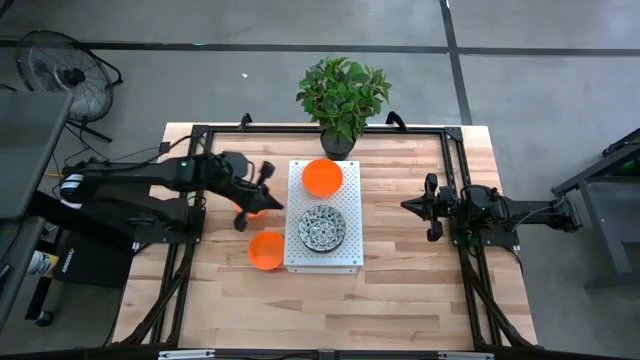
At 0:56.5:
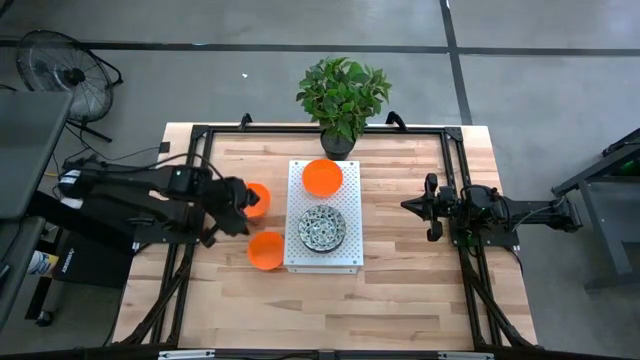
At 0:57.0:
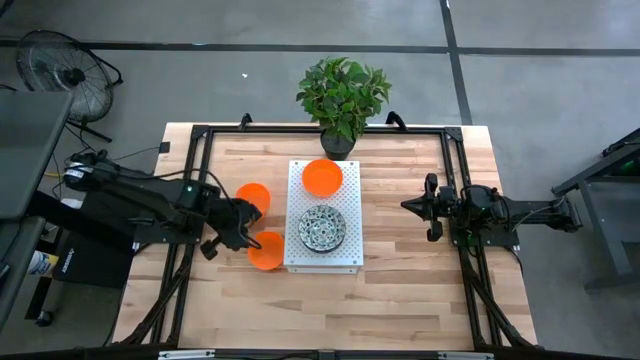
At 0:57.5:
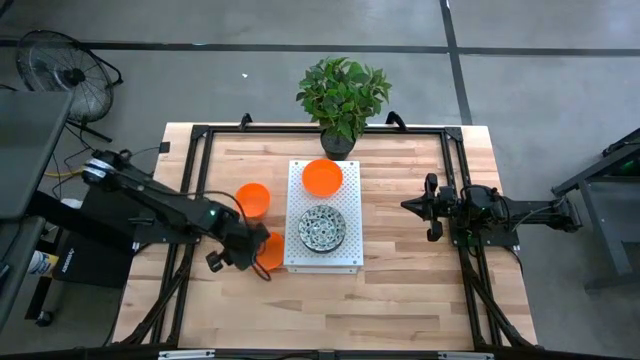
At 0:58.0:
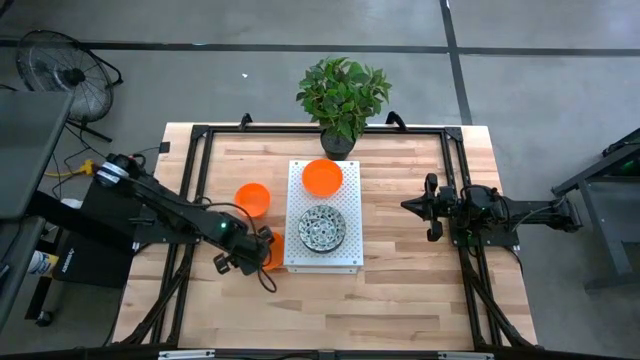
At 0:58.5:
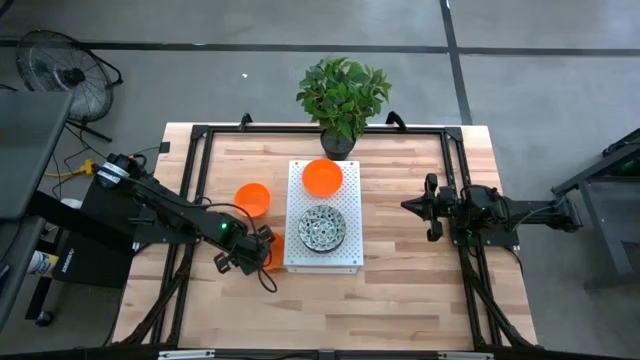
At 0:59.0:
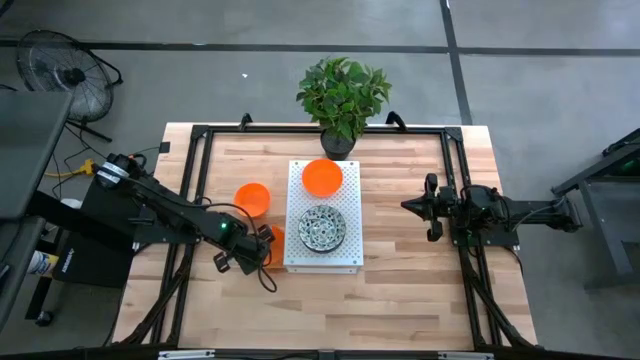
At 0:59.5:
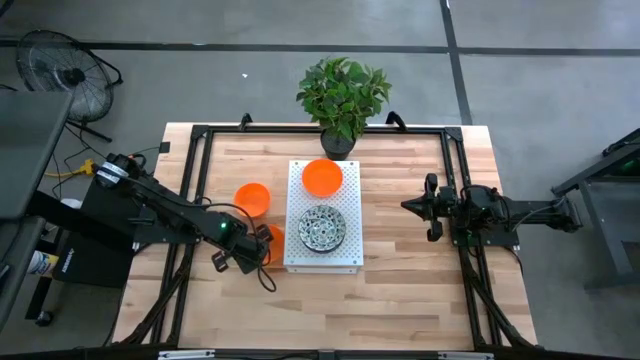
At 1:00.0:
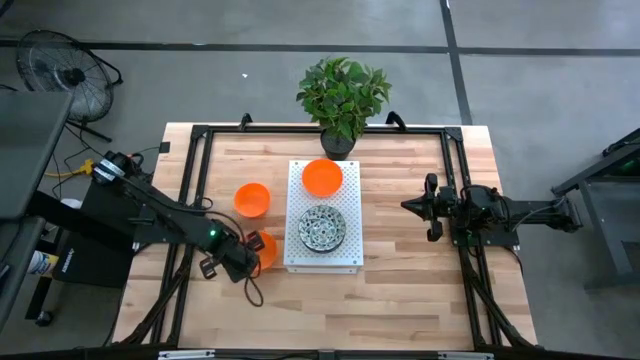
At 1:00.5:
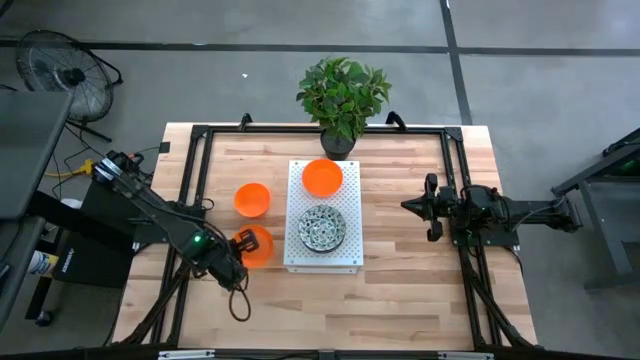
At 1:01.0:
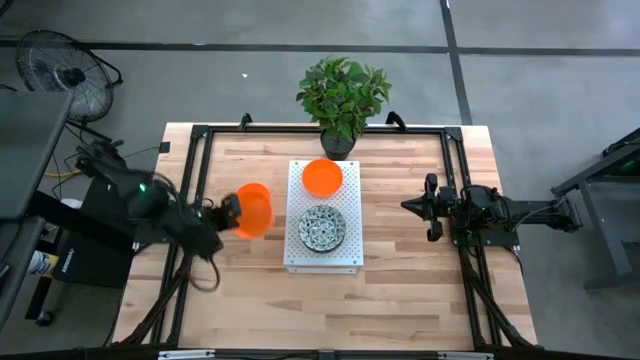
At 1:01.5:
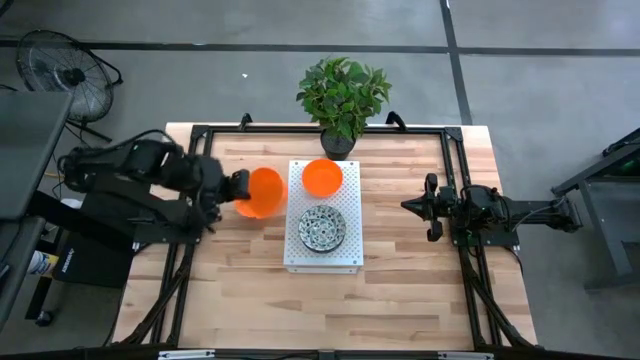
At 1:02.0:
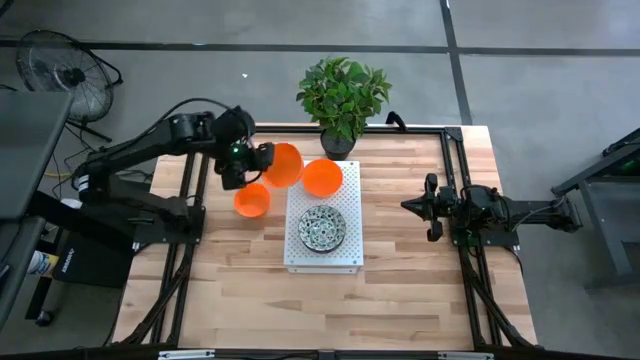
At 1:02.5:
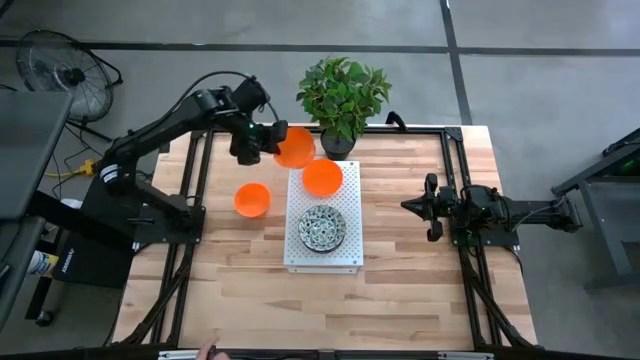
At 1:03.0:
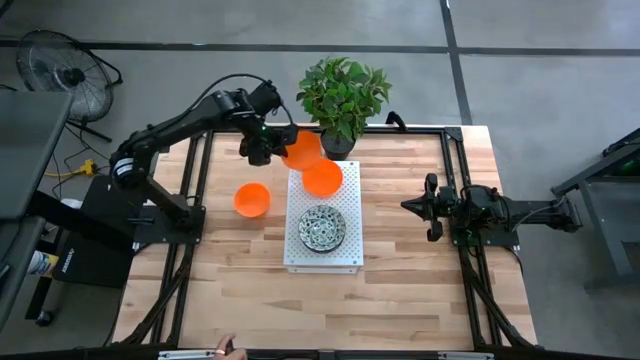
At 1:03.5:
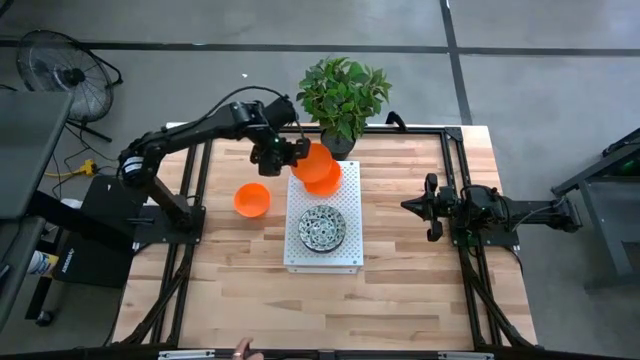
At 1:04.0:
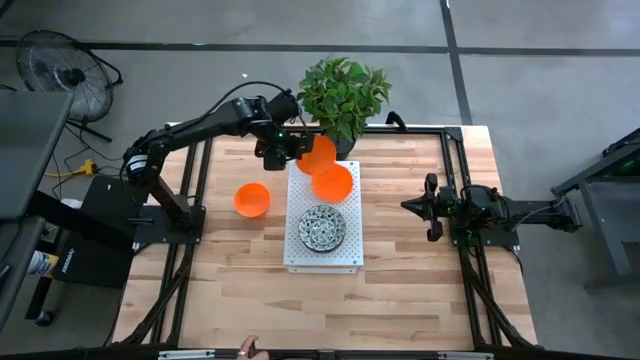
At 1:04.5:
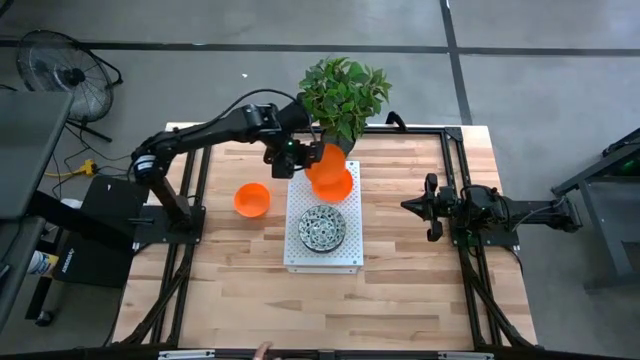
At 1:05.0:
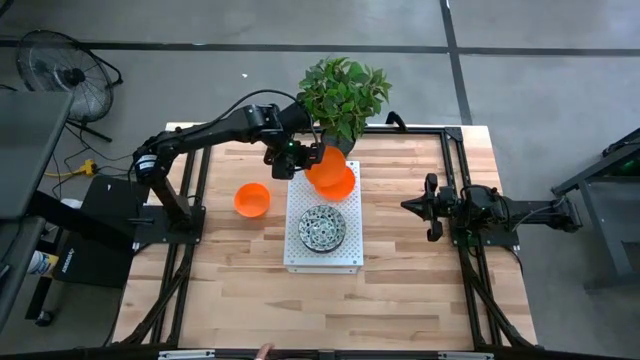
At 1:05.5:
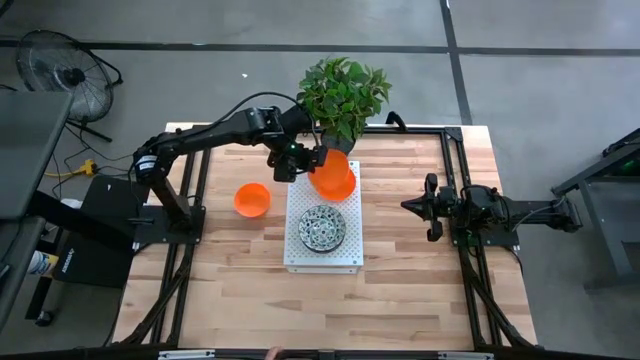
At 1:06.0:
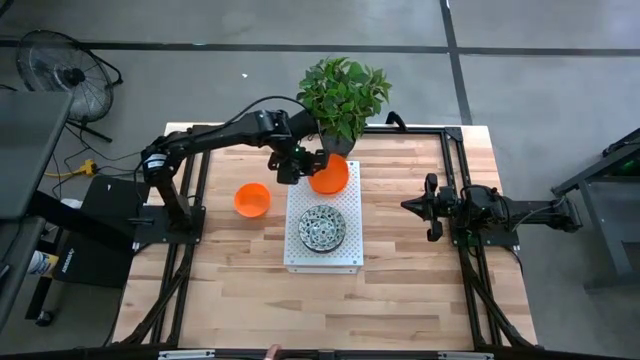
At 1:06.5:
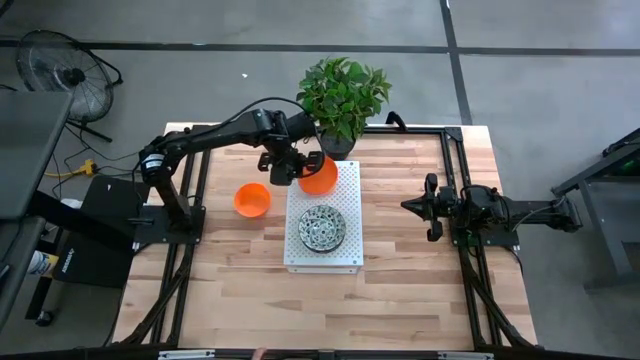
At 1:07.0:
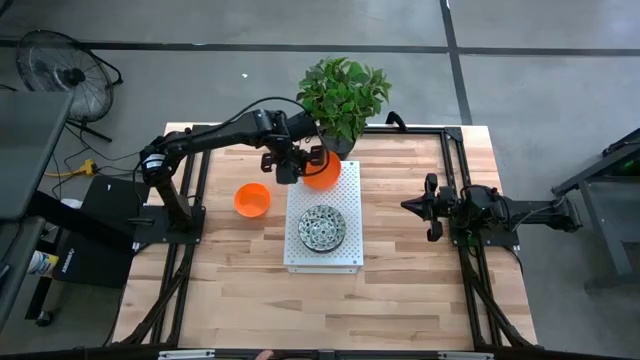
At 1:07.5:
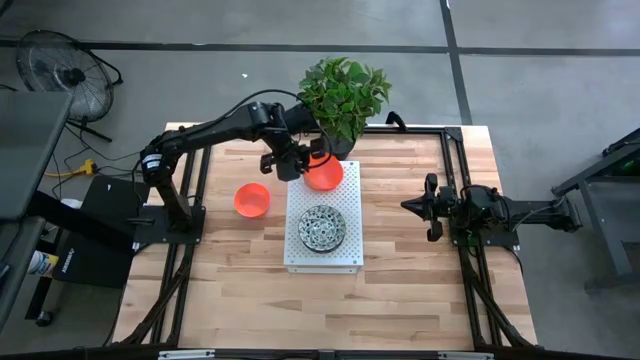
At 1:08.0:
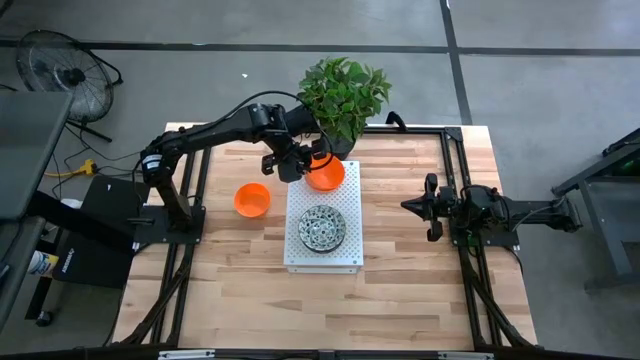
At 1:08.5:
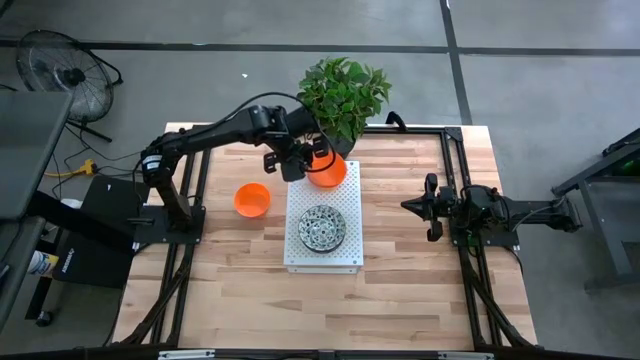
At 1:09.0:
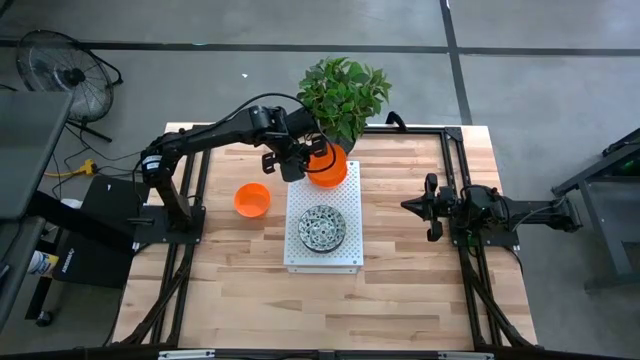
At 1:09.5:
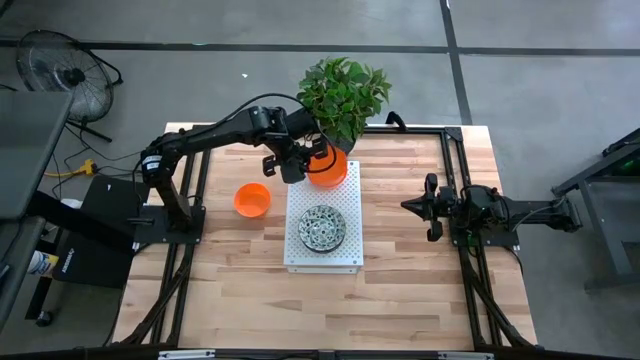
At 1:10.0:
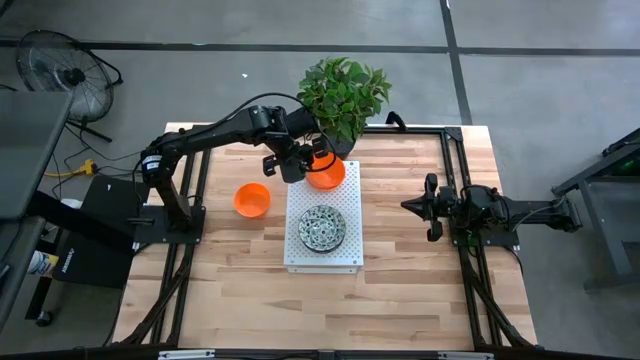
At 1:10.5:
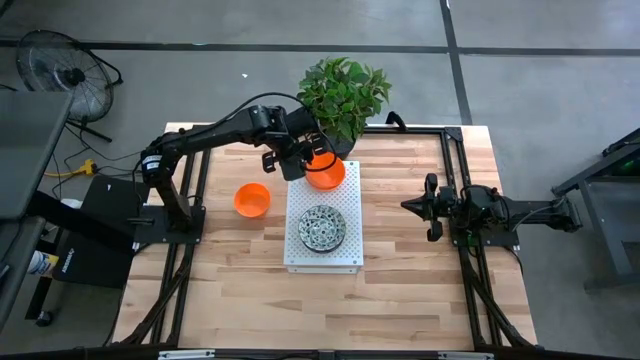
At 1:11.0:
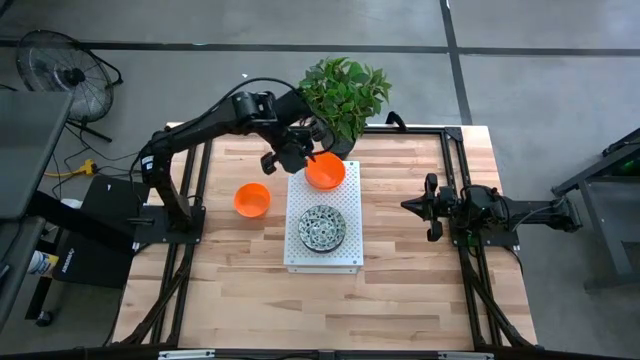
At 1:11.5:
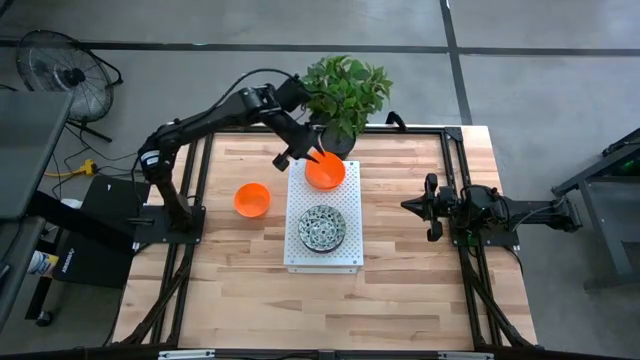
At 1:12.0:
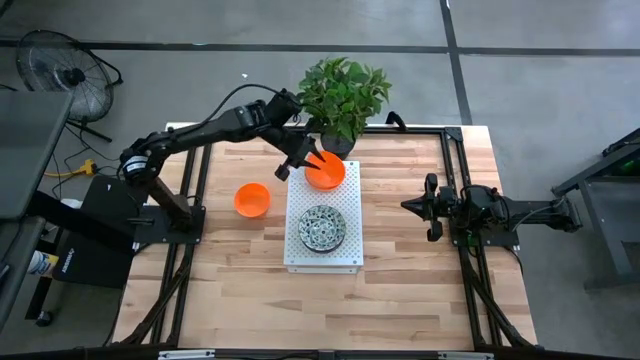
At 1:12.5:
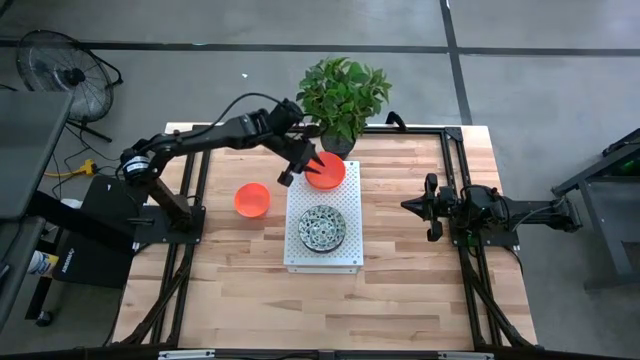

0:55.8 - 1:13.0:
Task: Pick & Place Mini bowls
Stack the bottom orange bowl on top of the orange bowl on the shelf

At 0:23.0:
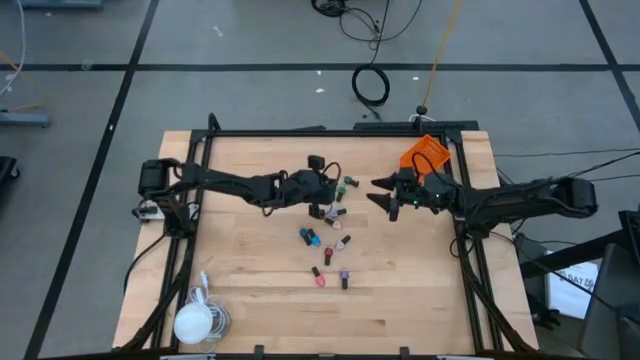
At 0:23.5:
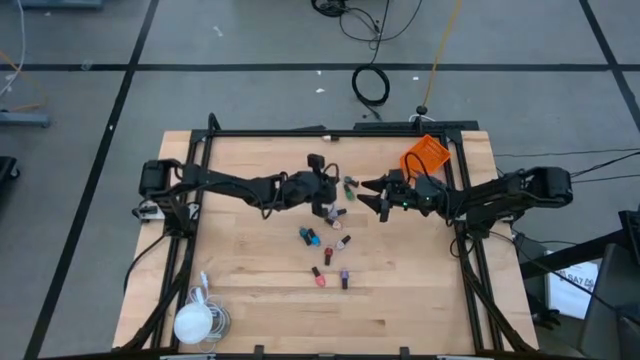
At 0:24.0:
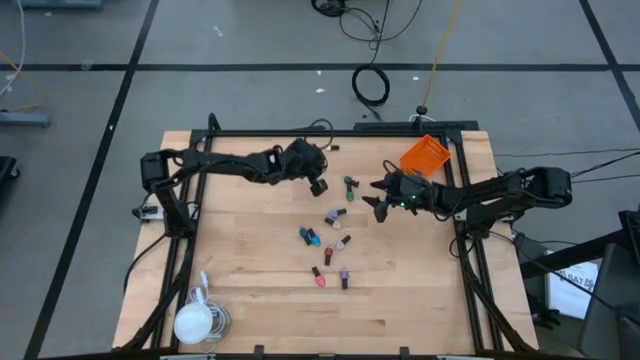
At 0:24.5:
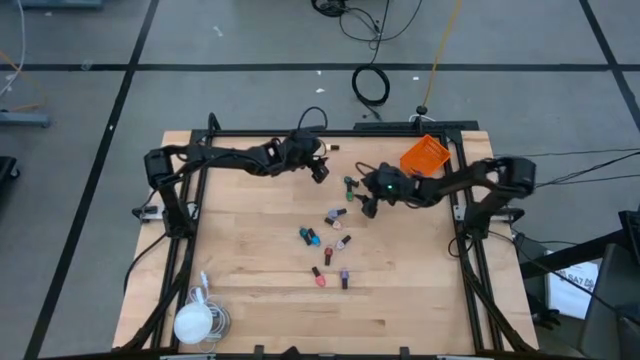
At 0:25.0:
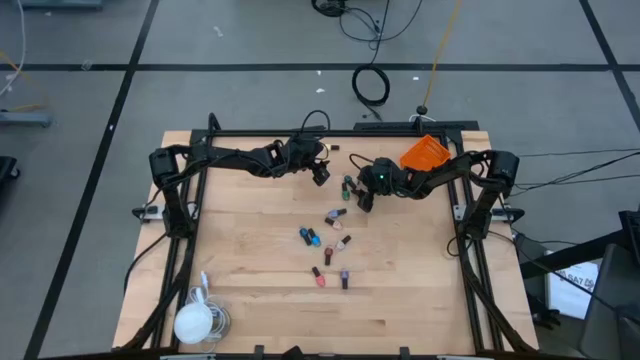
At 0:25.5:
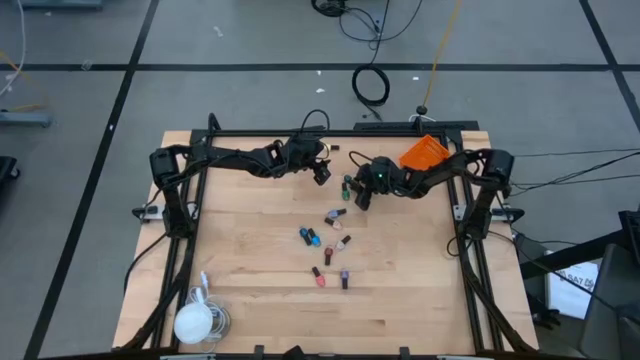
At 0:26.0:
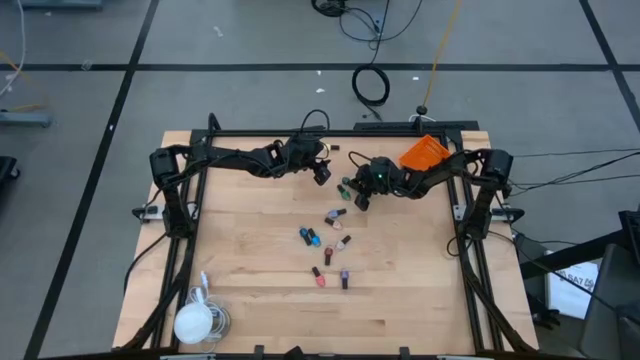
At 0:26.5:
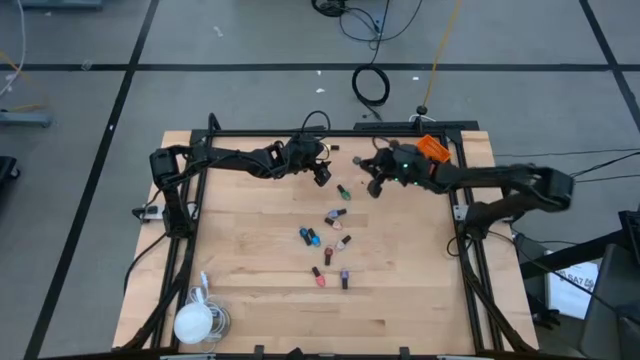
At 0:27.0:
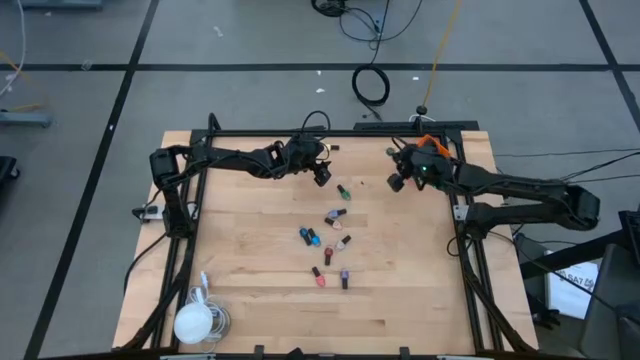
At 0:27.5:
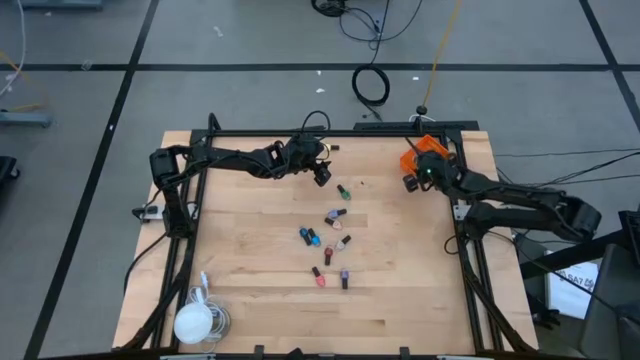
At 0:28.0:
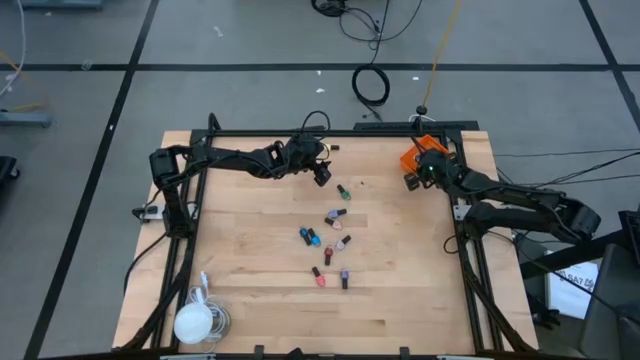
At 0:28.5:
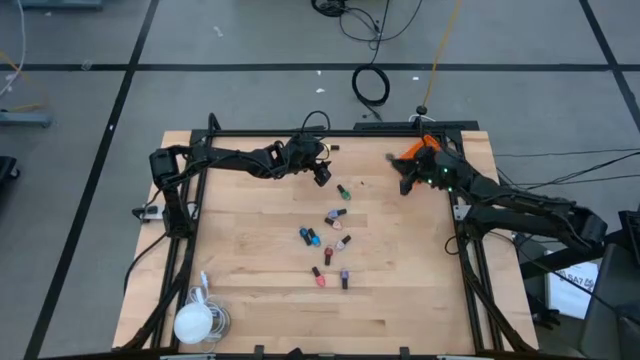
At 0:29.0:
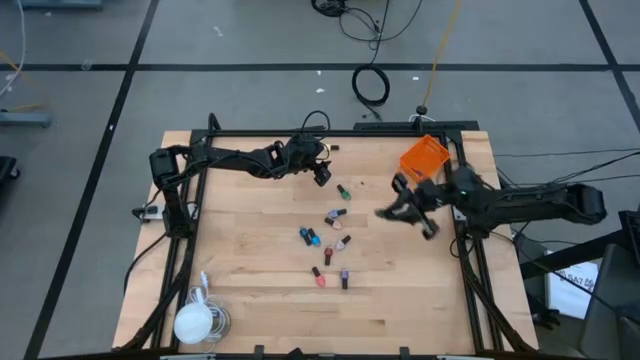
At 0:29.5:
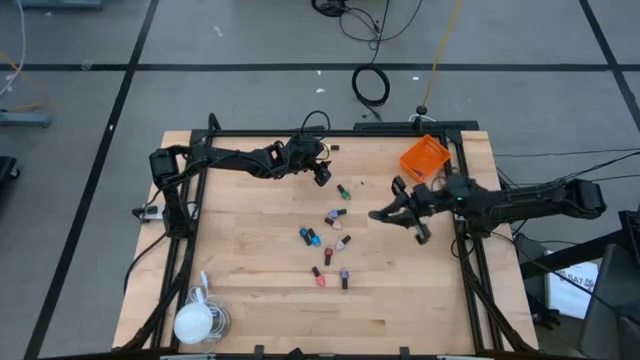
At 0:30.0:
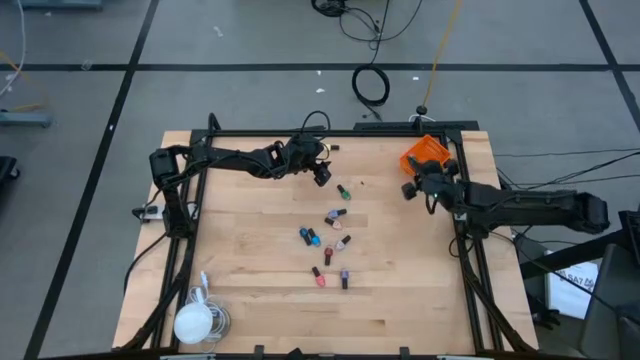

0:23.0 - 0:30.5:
Task: Pick & Place Nail Polish
Put the dark green nail polish bottle into the orange basket
